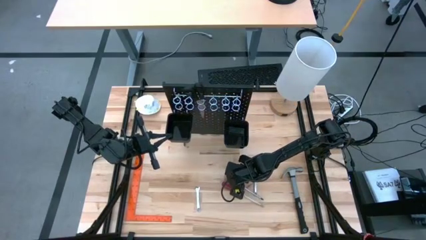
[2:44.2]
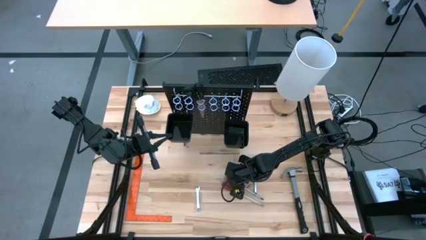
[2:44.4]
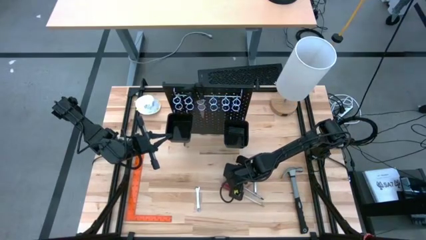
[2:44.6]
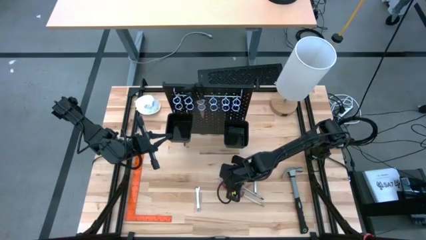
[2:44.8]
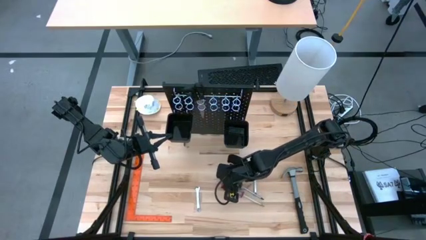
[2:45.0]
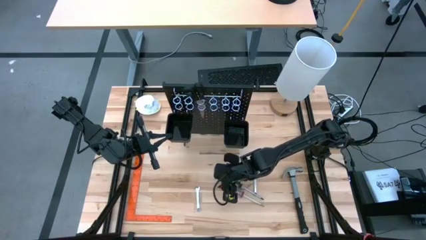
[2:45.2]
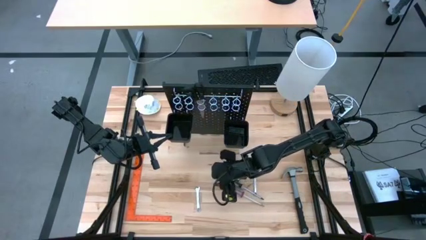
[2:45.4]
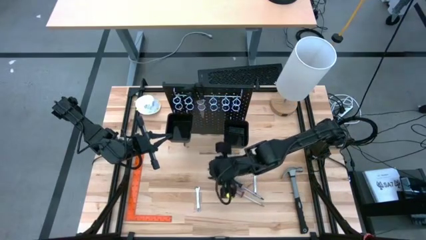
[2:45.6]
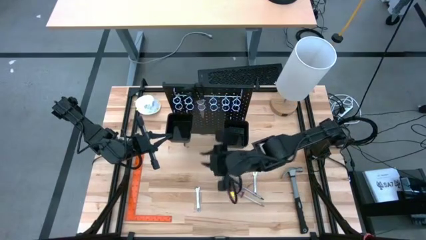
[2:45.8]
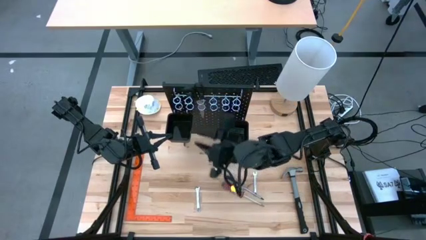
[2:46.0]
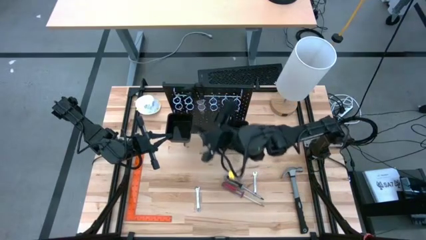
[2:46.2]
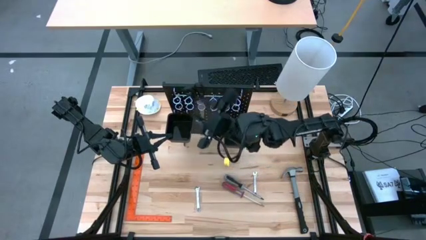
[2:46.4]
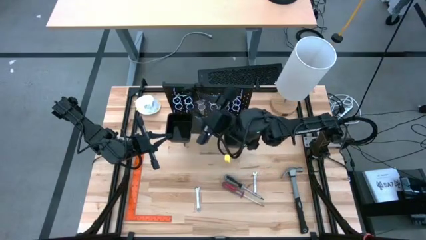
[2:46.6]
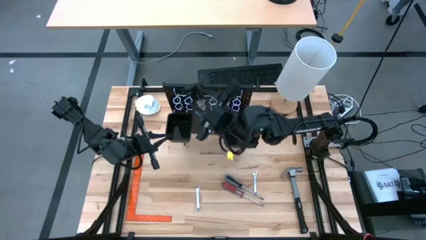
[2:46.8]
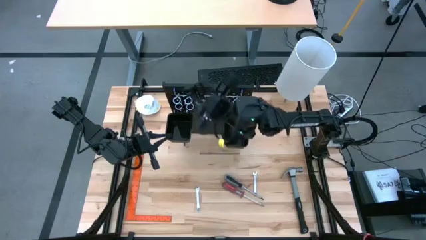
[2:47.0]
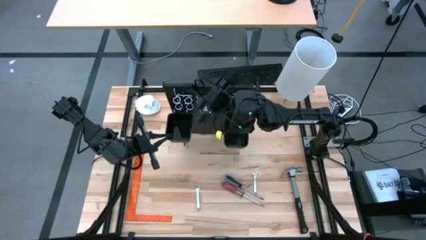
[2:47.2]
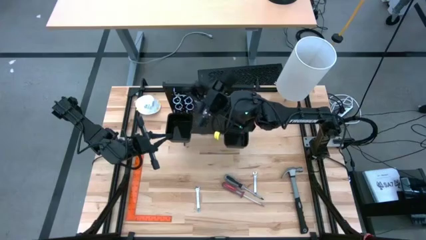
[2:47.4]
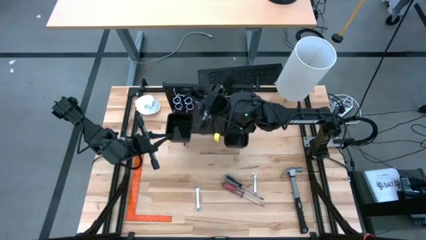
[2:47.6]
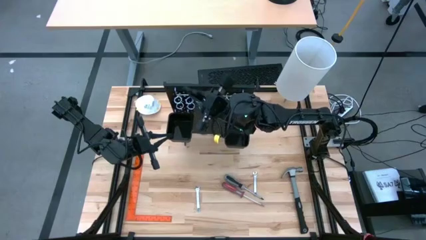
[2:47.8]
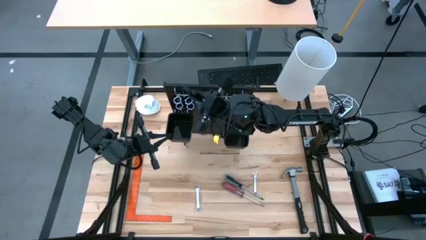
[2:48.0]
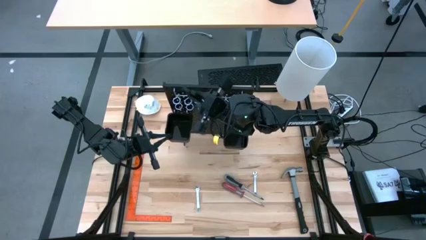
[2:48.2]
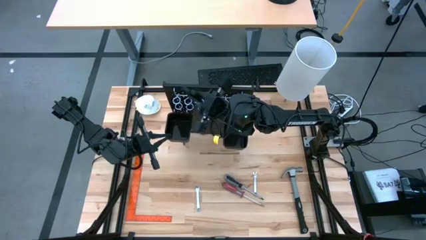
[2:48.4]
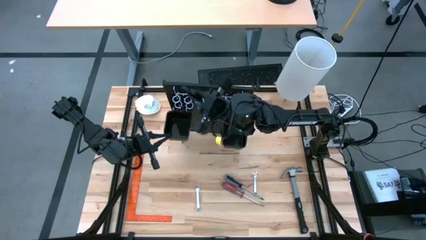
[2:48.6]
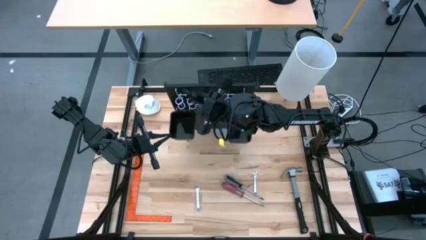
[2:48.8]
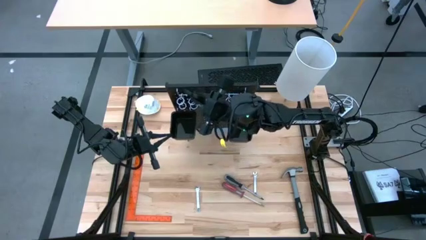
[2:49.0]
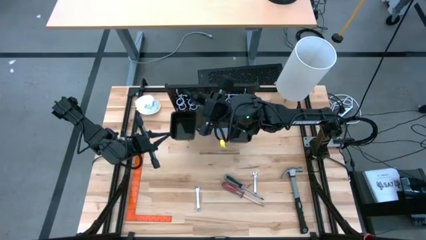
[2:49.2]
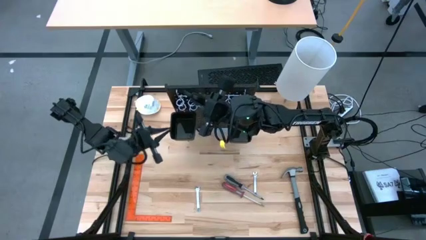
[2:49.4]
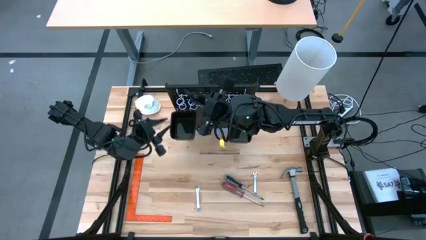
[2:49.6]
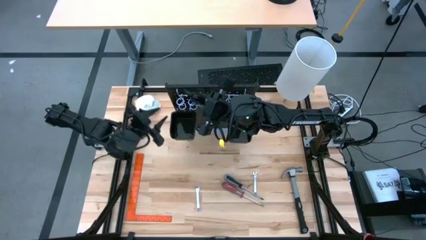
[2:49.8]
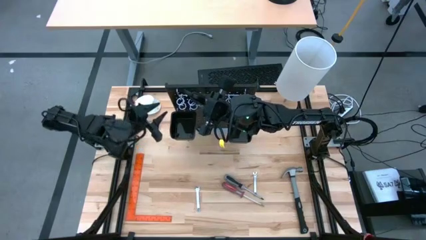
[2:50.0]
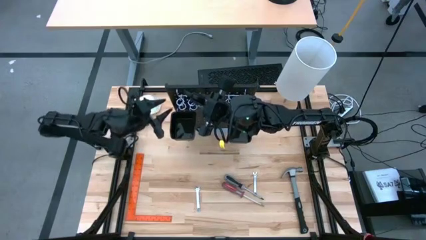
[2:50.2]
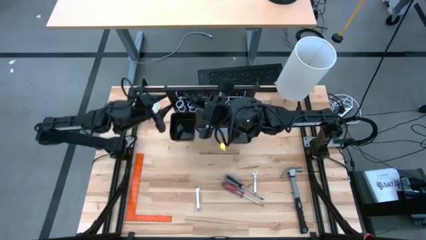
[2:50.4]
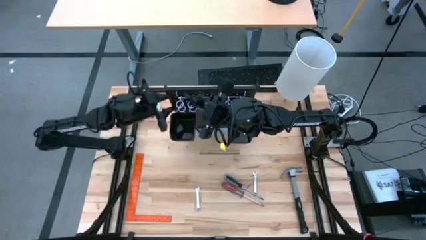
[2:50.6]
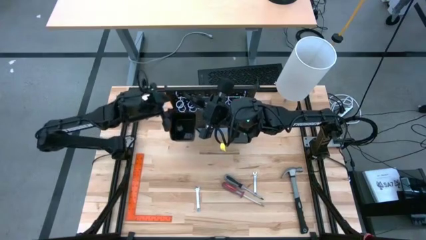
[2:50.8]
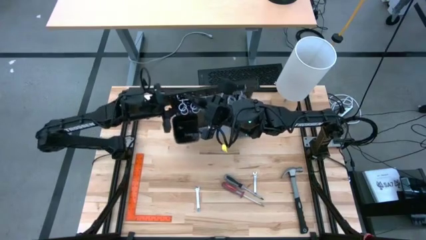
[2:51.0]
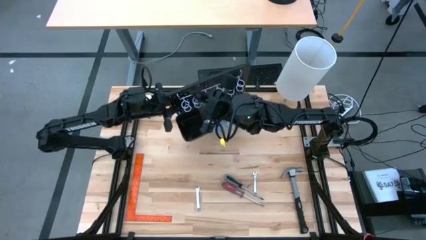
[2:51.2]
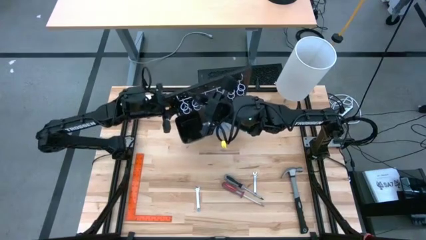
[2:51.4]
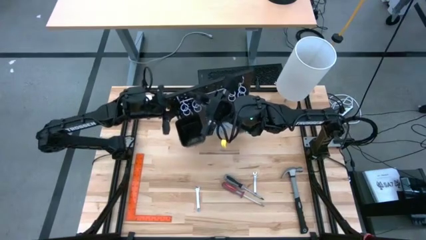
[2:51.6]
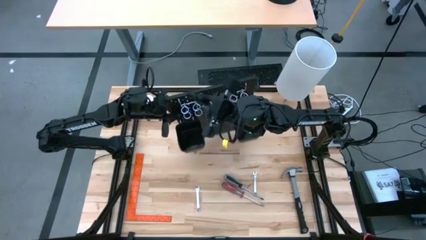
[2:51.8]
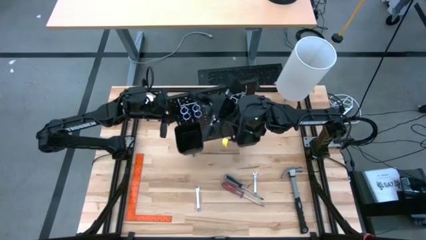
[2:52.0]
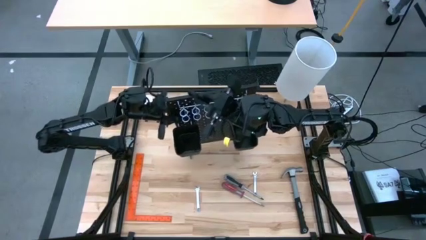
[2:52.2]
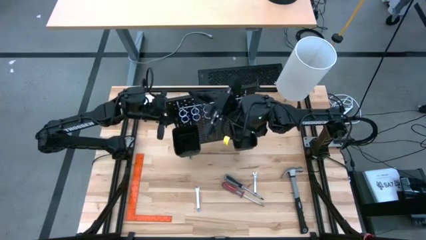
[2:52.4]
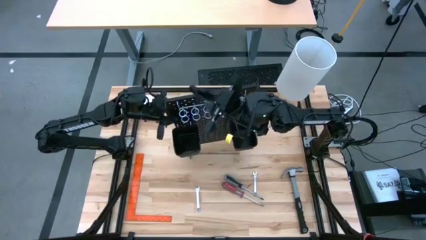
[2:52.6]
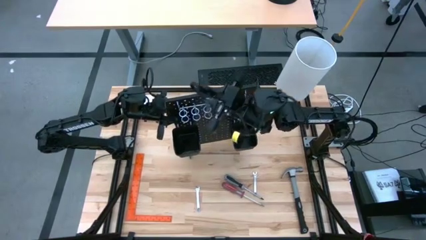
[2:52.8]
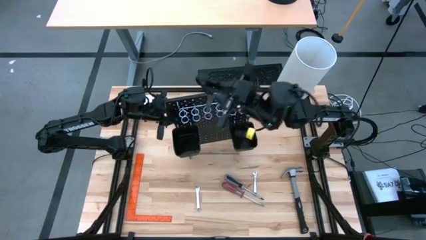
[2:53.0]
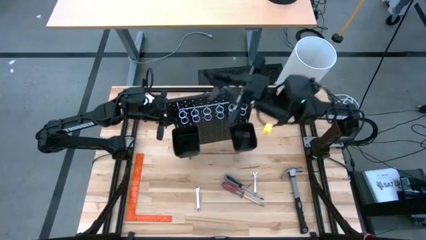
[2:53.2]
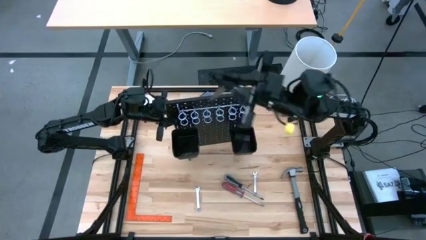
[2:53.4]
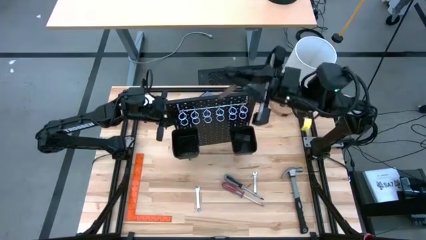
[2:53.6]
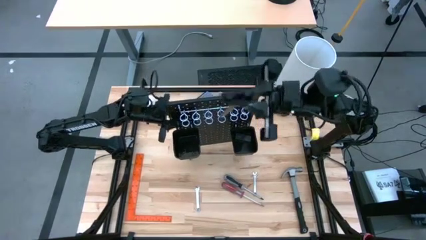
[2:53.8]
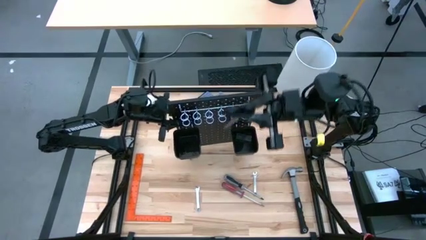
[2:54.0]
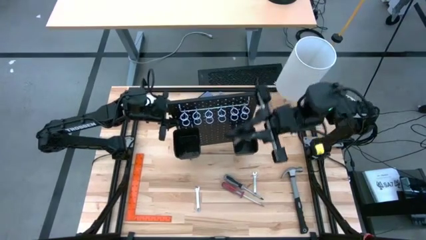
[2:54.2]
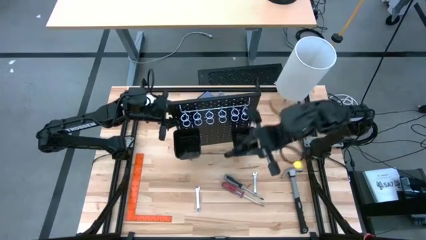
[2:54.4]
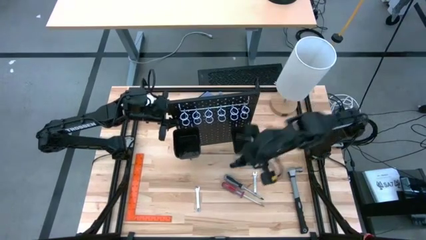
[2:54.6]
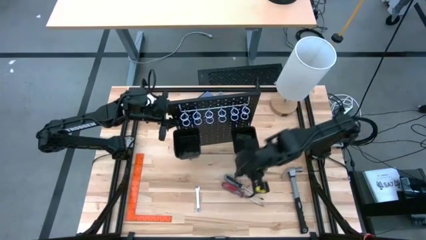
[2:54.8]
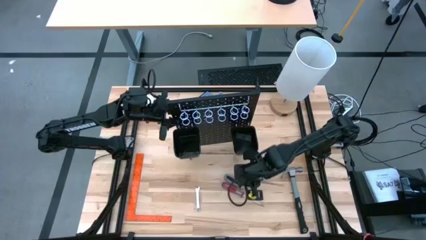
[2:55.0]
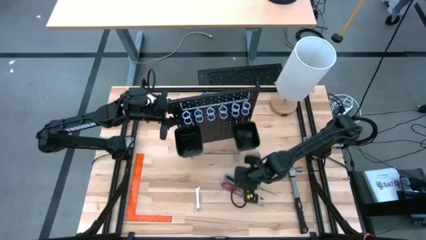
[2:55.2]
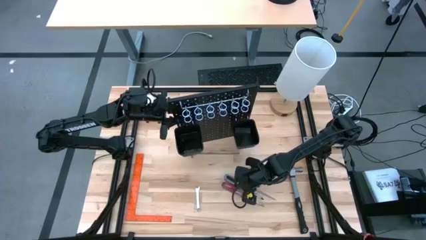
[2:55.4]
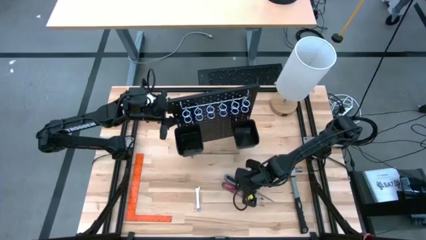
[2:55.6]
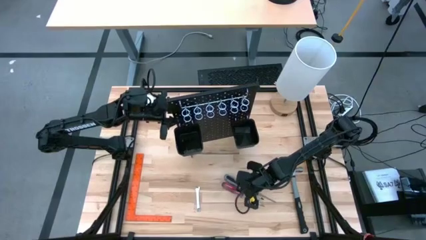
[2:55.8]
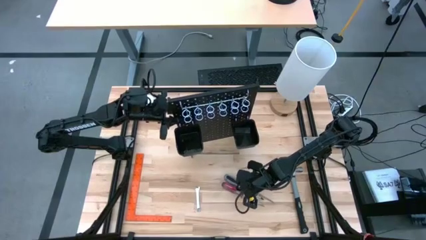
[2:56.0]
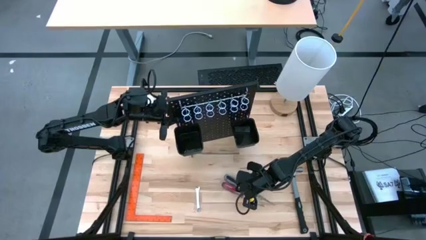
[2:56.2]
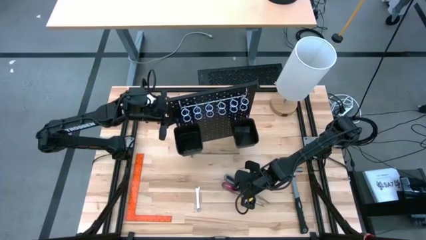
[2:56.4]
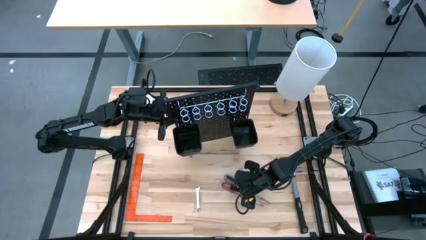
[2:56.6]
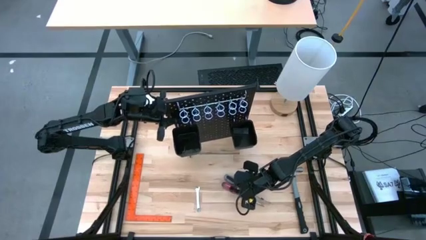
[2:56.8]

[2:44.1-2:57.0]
Task: Hang tools onto peg board
Remove the black scissors from the black peg board
